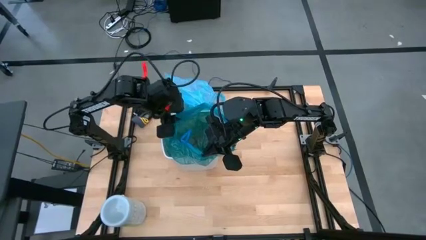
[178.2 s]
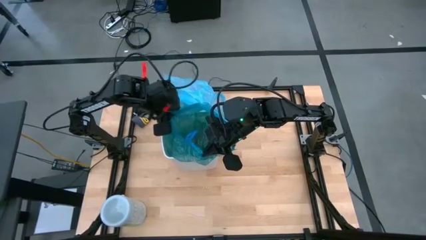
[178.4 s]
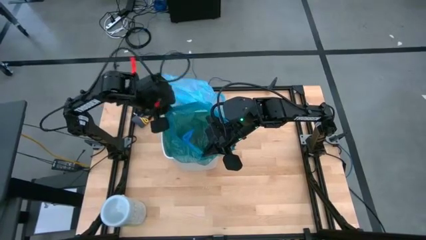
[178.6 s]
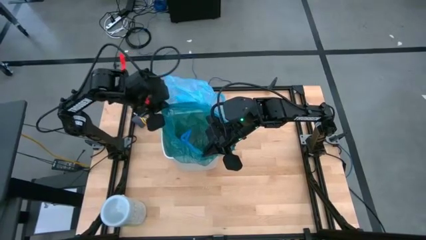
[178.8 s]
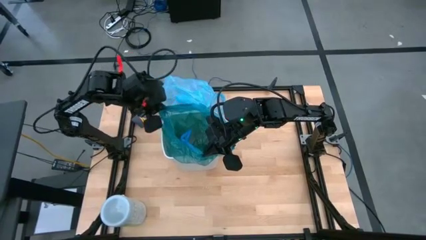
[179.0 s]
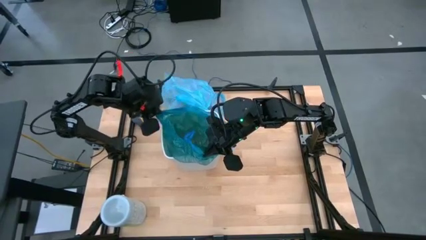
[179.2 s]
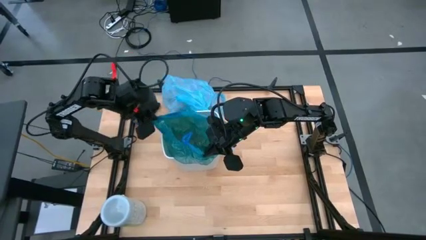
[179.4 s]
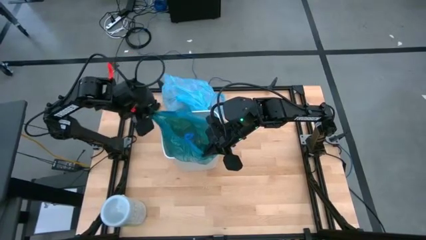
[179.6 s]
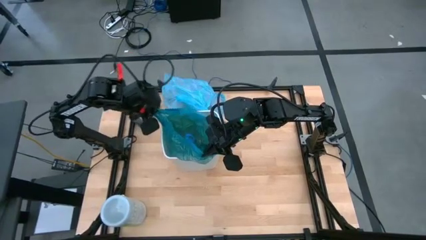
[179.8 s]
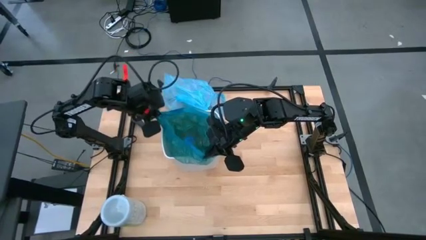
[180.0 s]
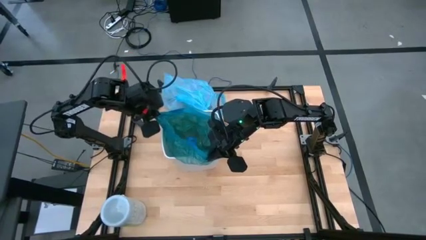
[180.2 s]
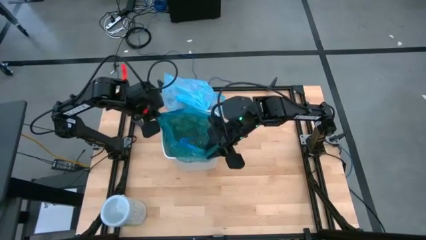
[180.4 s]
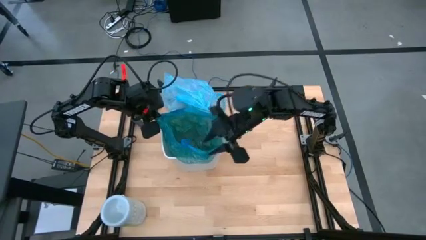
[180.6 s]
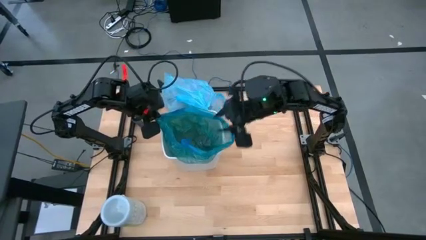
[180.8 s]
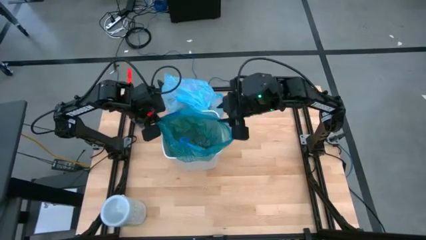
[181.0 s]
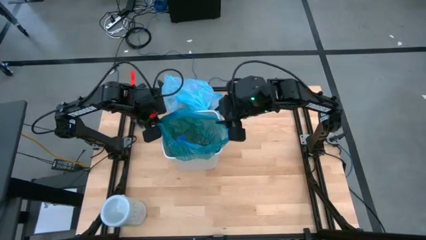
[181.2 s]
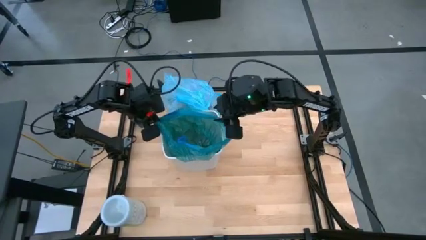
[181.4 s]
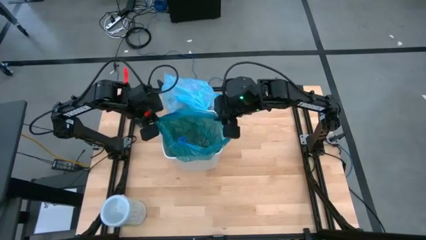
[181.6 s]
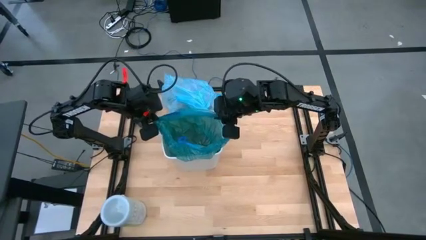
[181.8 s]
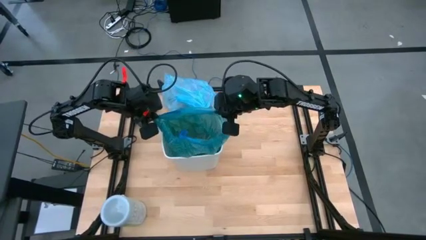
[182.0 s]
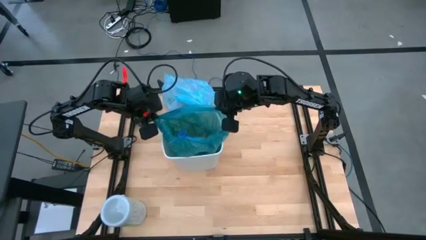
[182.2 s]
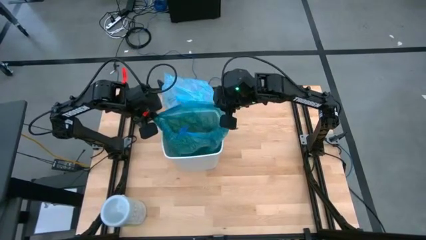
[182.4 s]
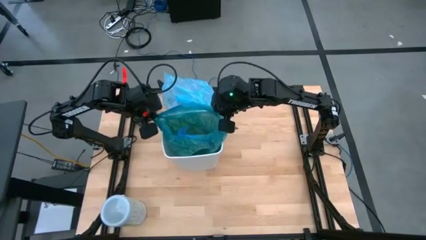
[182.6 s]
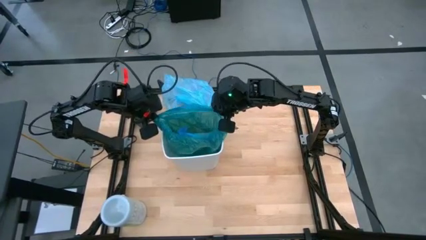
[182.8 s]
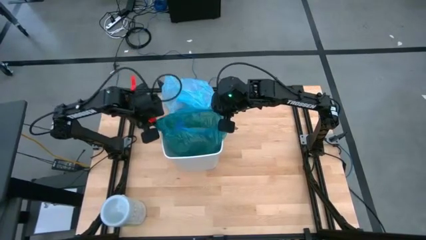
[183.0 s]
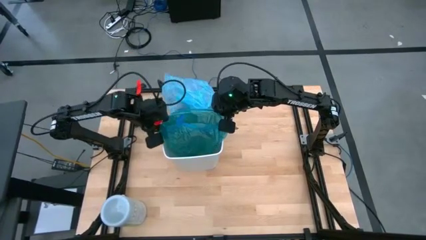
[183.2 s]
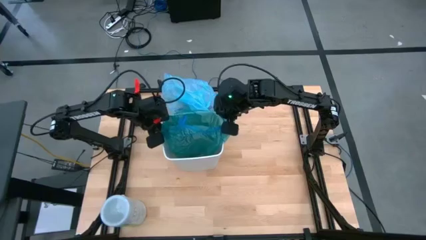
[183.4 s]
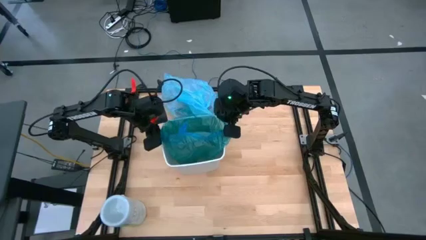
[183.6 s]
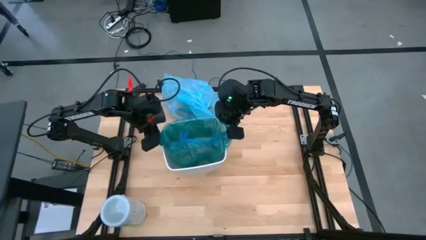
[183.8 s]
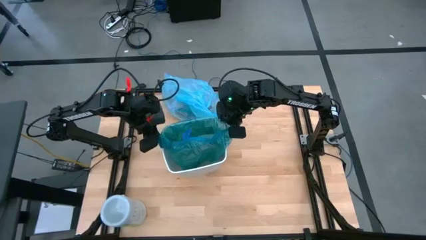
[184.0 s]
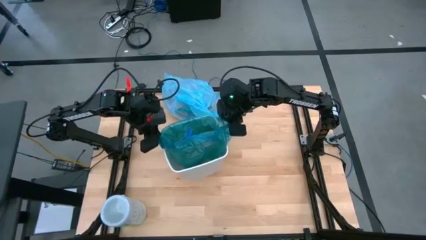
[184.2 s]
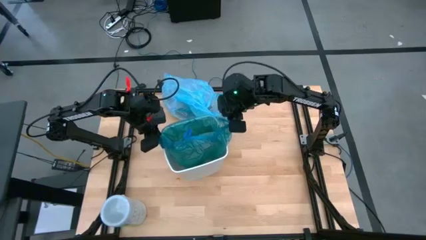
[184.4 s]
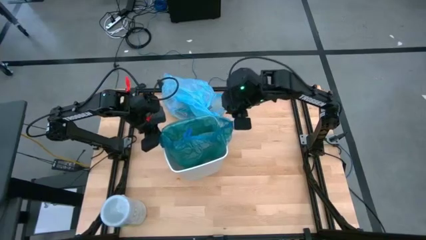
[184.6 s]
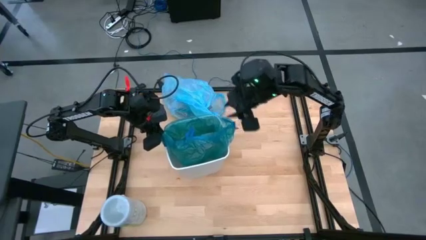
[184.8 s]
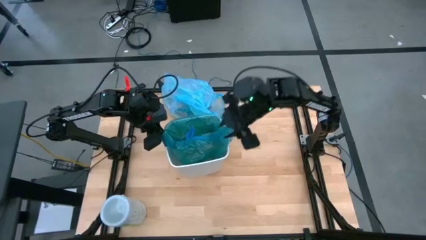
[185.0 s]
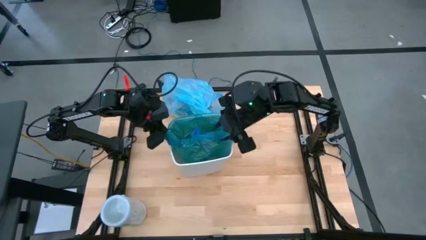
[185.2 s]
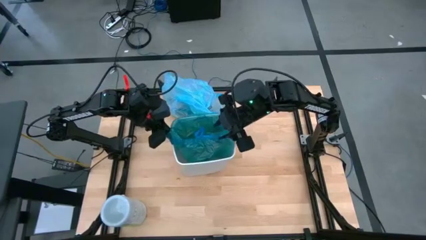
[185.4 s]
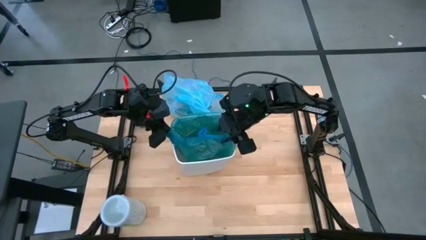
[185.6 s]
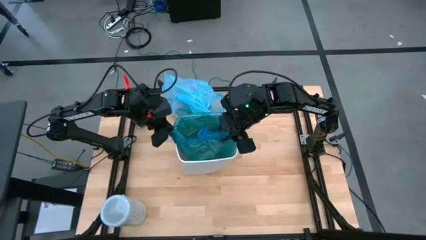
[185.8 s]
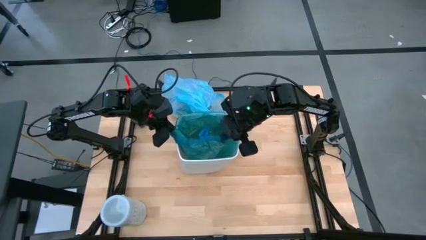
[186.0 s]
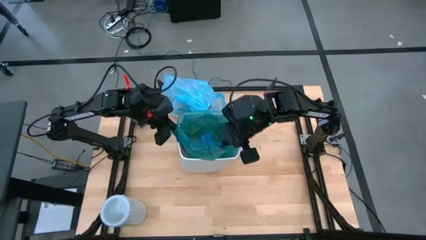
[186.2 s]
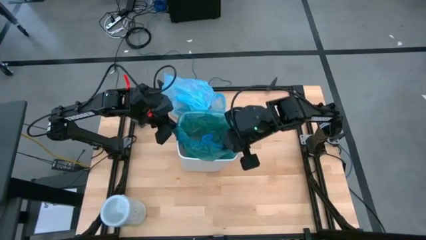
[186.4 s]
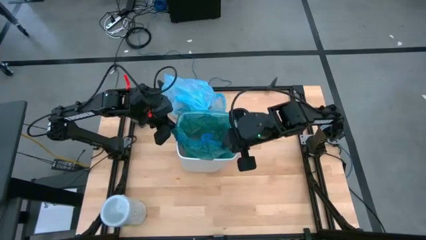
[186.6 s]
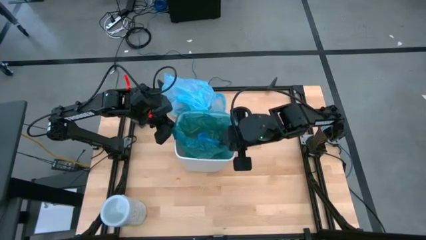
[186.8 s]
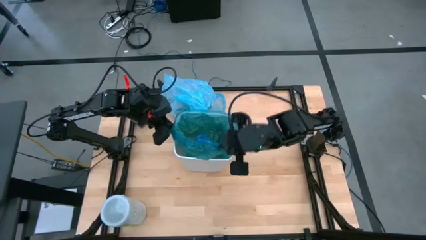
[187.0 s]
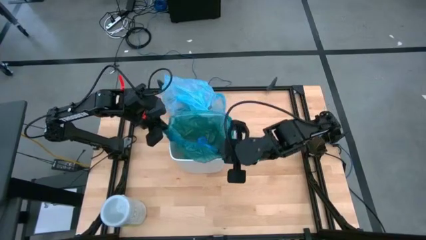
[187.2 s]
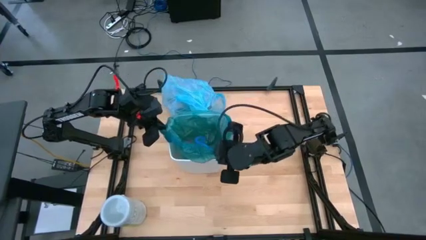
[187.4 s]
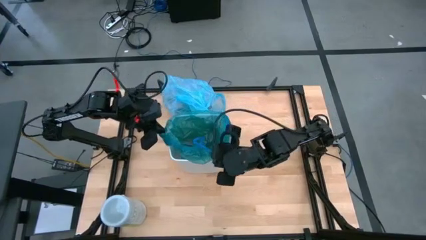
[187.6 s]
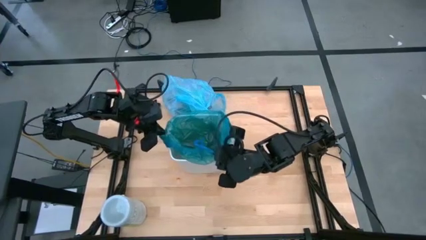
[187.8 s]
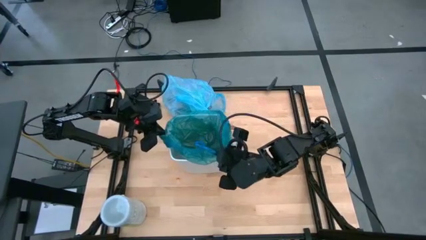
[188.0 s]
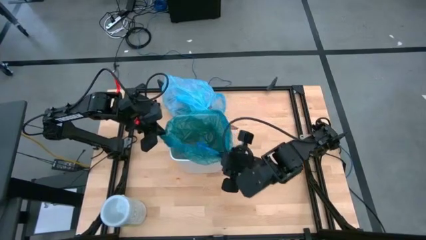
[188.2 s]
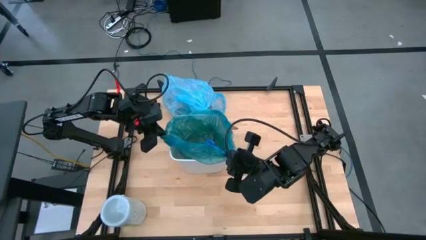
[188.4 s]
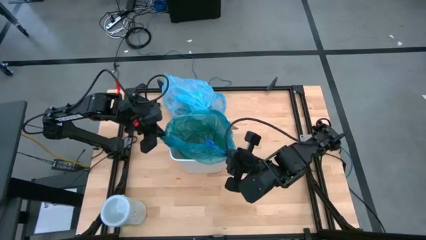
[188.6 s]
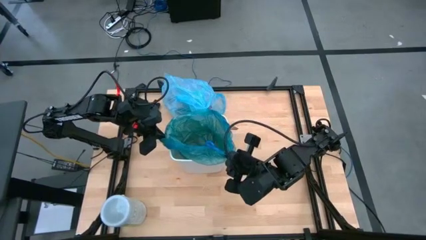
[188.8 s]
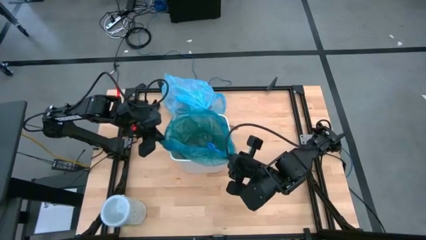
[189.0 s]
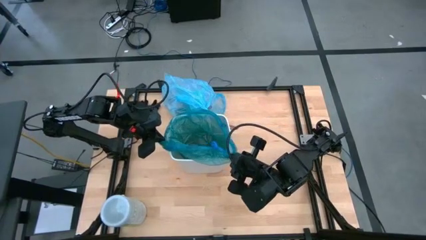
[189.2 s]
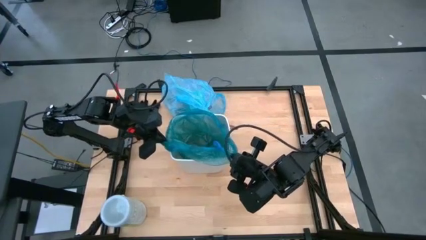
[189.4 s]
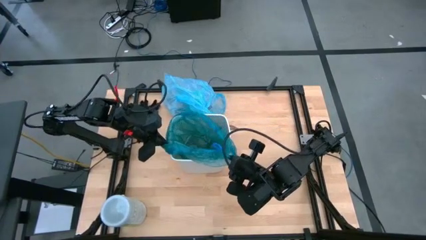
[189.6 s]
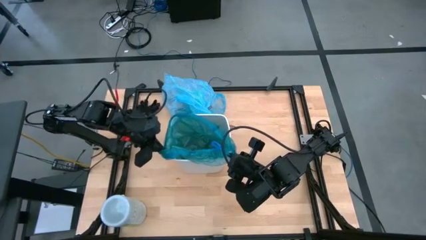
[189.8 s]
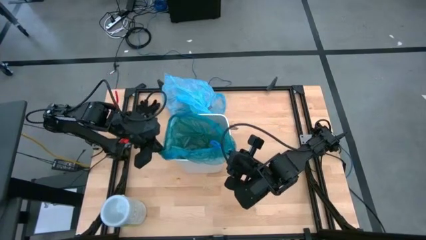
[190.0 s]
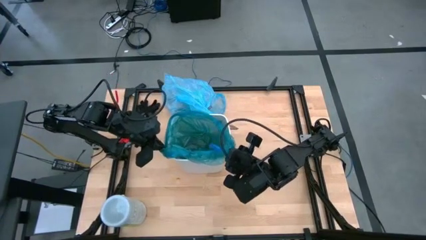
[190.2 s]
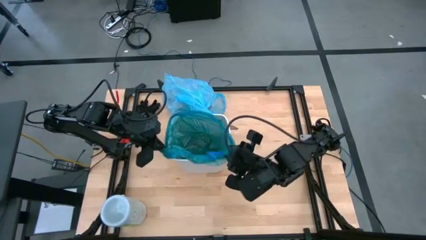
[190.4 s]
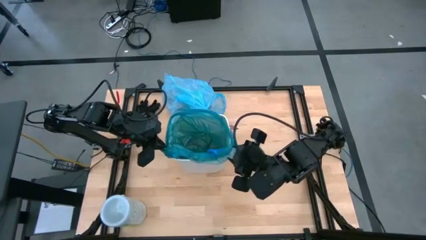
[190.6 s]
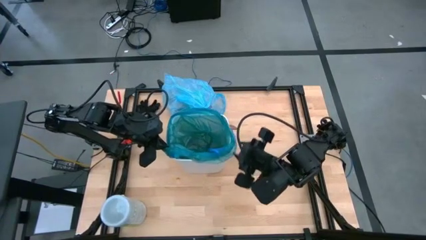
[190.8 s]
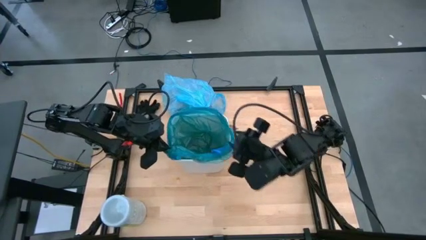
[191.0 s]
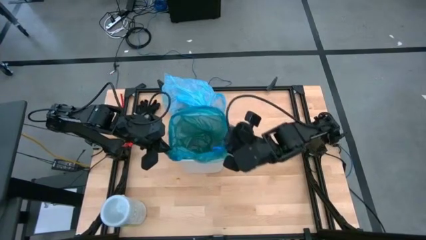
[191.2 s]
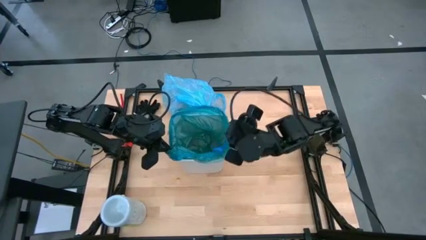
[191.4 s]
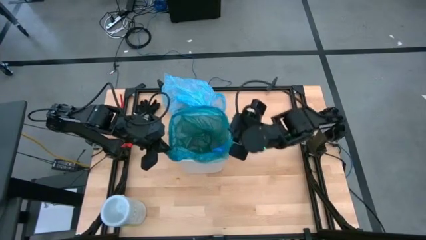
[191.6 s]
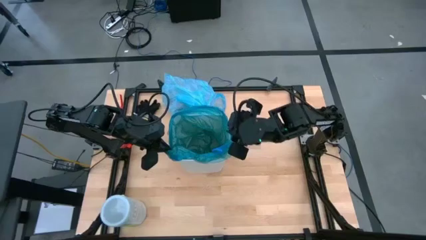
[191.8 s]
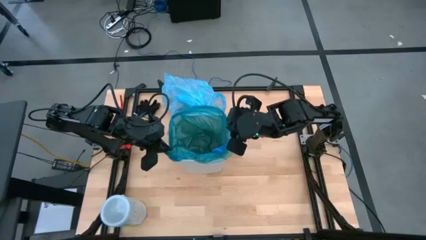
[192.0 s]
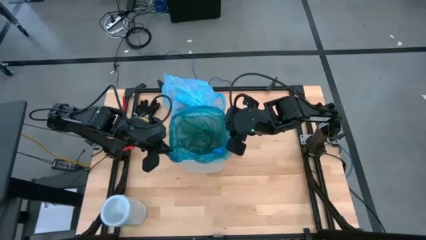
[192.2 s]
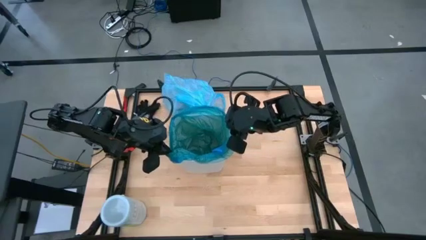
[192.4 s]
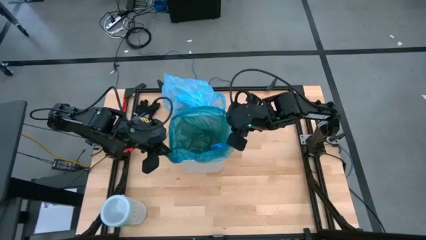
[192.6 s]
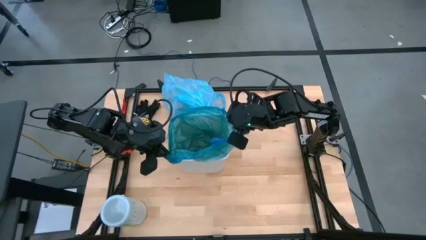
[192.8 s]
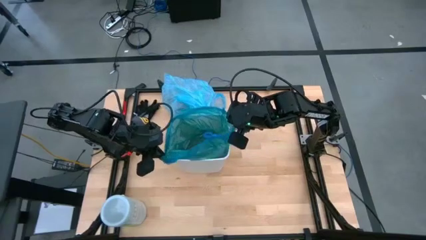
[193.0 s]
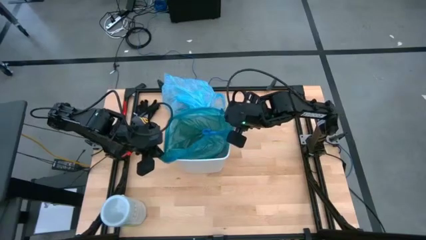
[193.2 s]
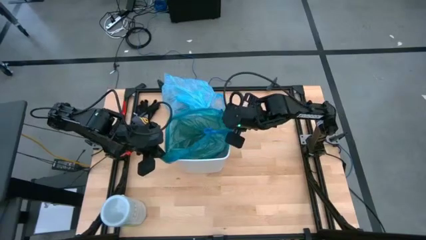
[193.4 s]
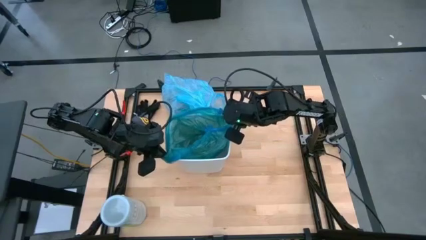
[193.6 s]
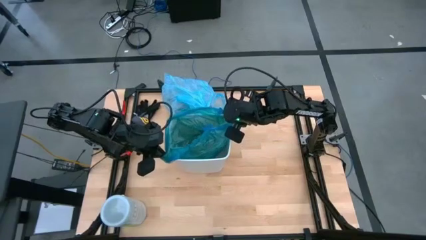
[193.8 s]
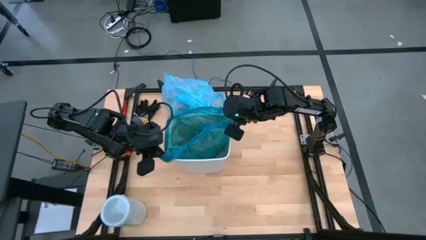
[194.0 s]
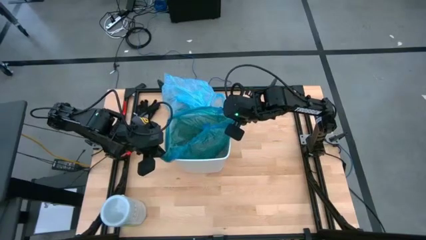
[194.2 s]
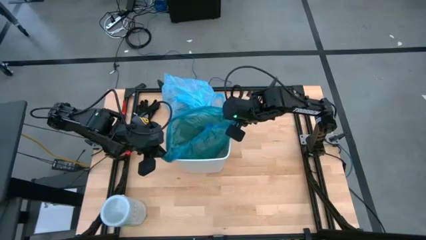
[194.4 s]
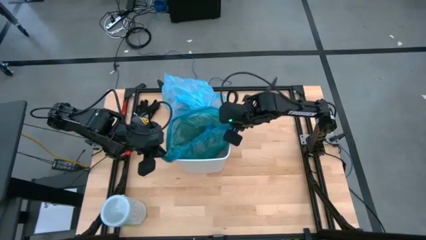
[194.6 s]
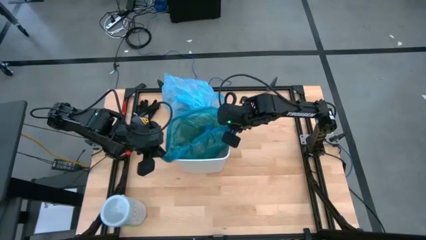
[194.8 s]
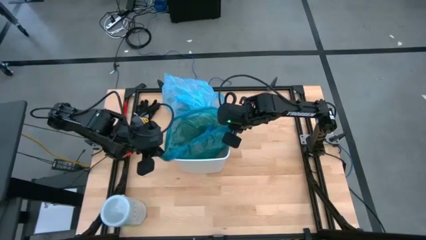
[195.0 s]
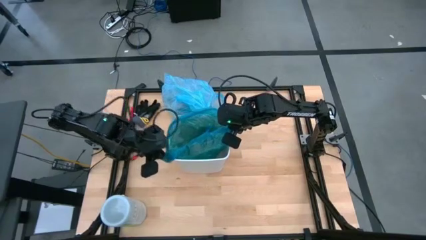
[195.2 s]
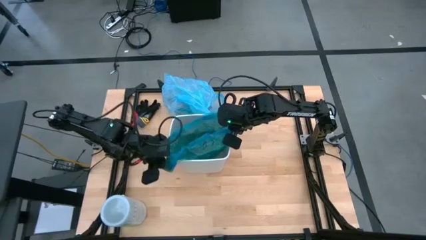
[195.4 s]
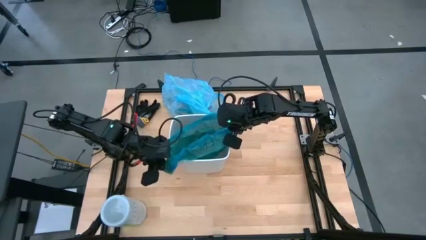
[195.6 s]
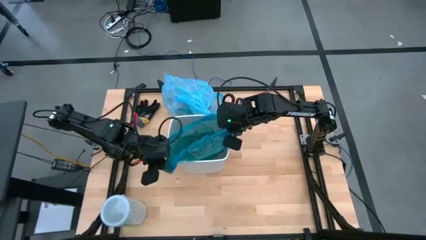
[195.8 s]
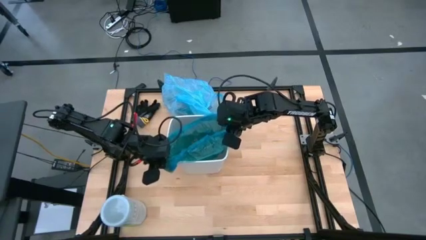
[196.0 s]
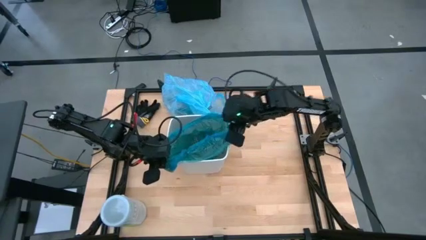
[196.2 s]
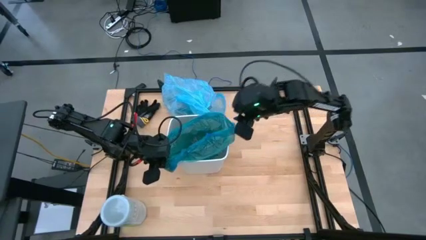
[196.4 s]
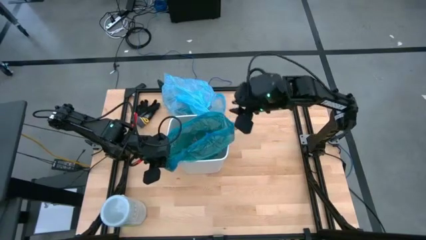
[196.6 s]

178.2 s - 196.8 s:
Task: place trash/remove bag and relplace
Insert the green plastic trash bag into the trash bin
